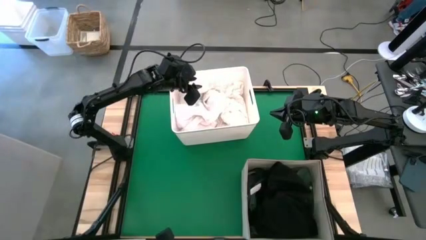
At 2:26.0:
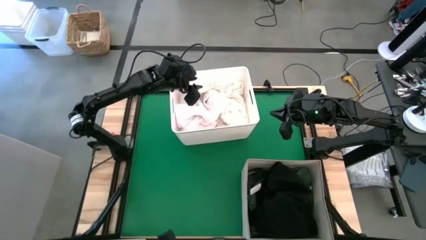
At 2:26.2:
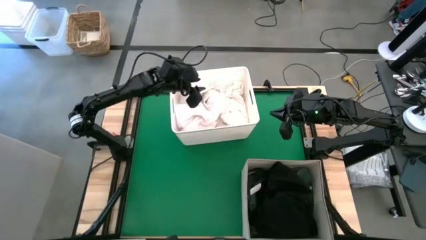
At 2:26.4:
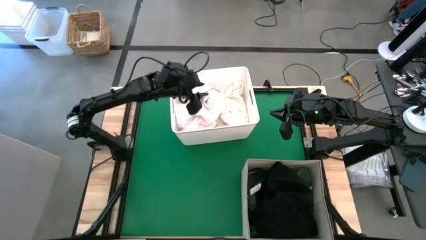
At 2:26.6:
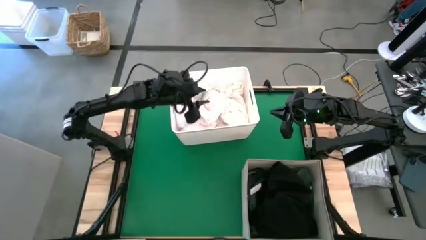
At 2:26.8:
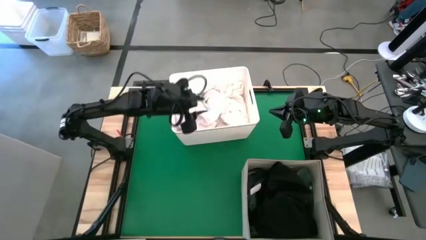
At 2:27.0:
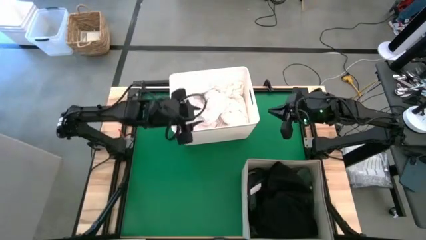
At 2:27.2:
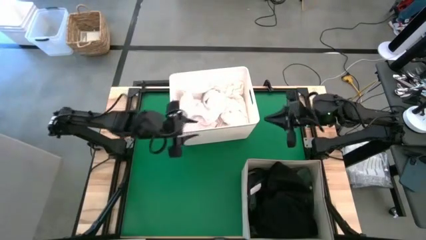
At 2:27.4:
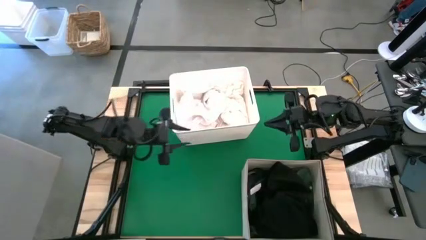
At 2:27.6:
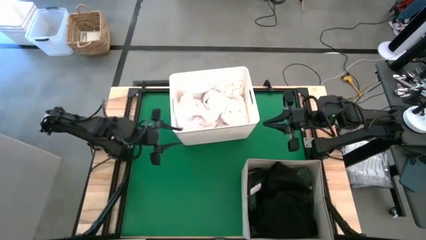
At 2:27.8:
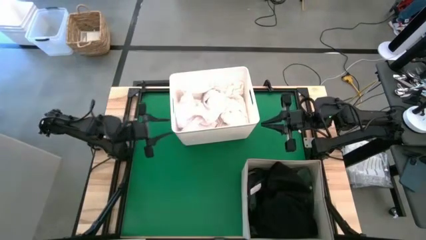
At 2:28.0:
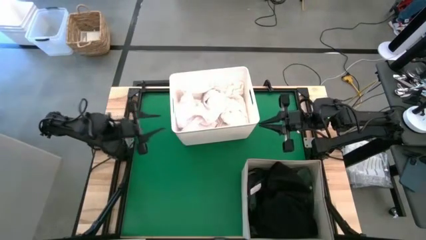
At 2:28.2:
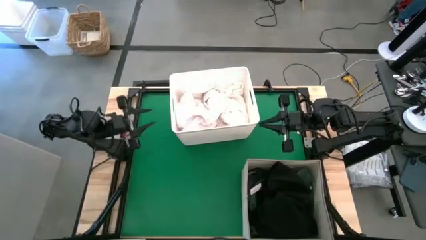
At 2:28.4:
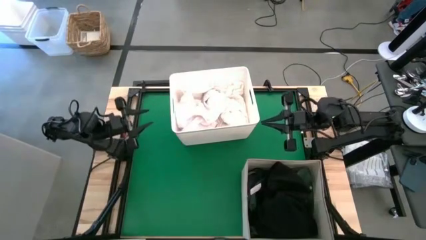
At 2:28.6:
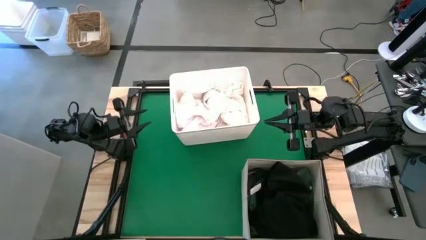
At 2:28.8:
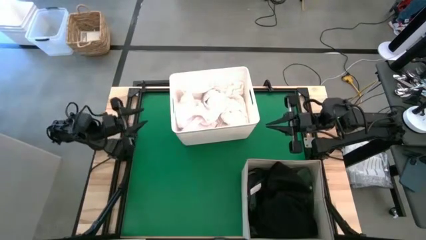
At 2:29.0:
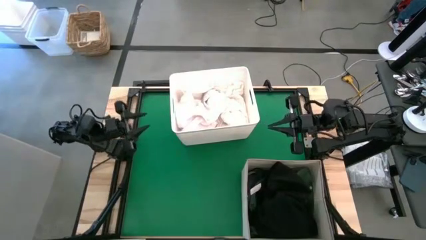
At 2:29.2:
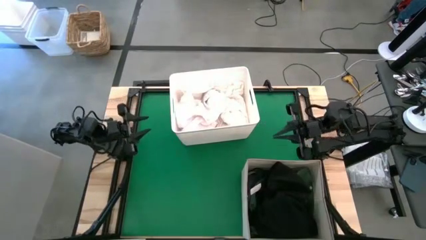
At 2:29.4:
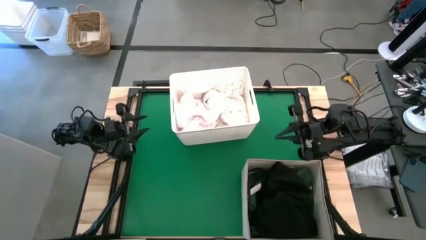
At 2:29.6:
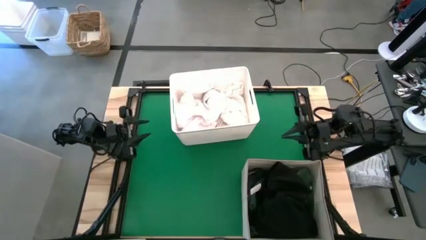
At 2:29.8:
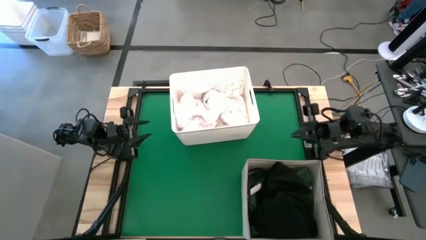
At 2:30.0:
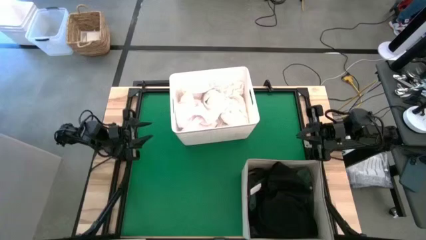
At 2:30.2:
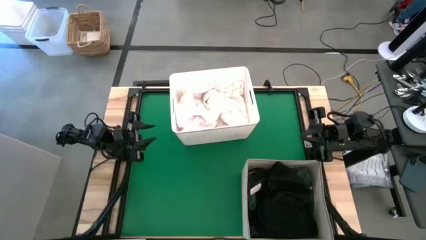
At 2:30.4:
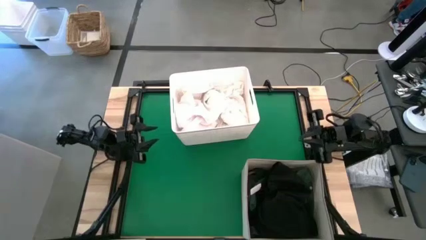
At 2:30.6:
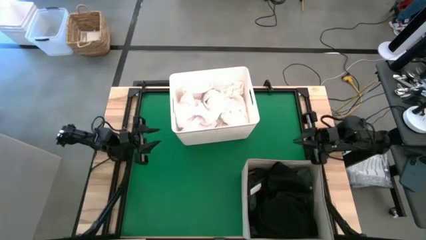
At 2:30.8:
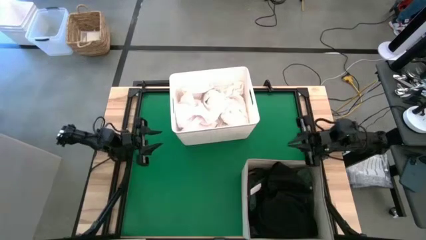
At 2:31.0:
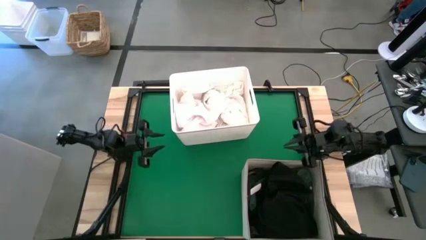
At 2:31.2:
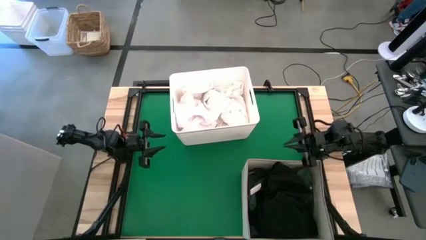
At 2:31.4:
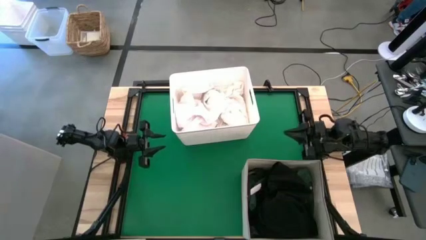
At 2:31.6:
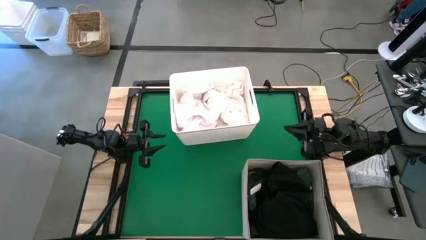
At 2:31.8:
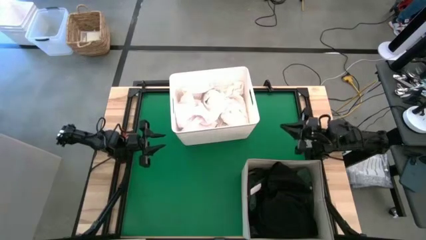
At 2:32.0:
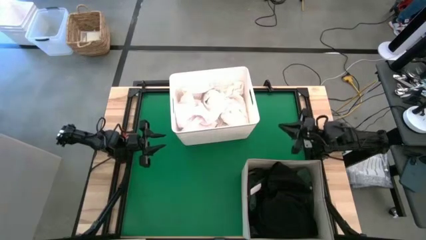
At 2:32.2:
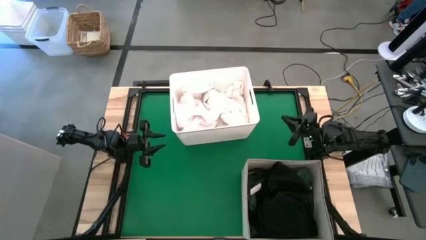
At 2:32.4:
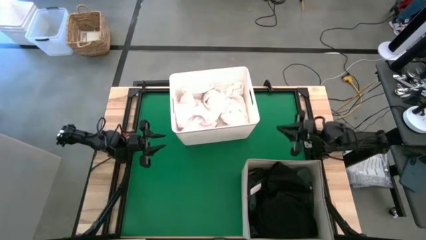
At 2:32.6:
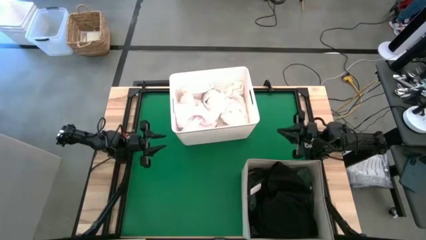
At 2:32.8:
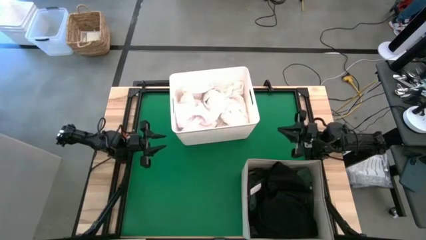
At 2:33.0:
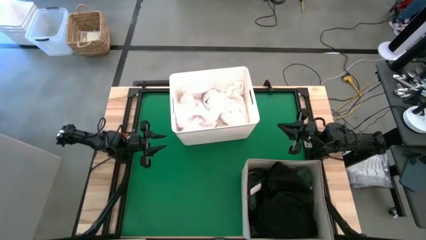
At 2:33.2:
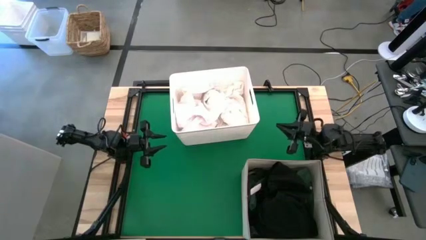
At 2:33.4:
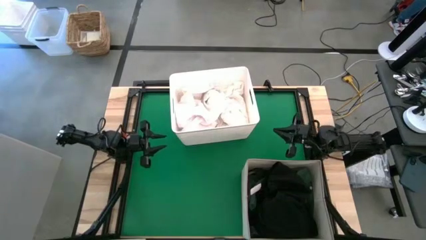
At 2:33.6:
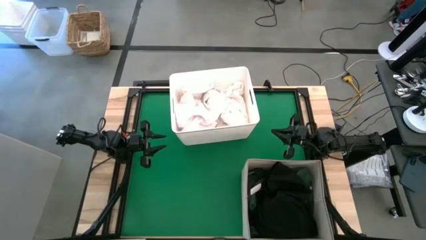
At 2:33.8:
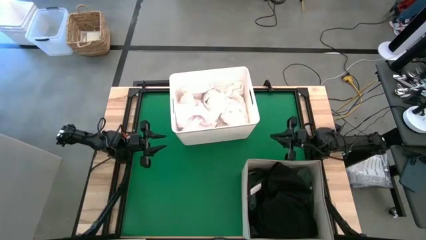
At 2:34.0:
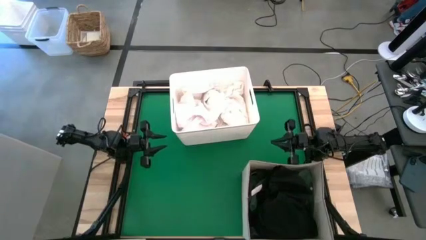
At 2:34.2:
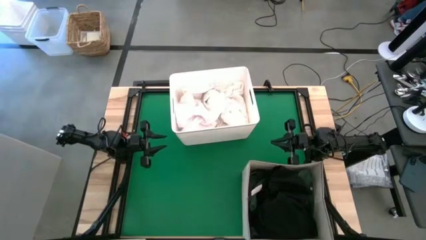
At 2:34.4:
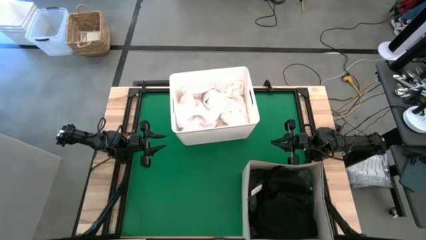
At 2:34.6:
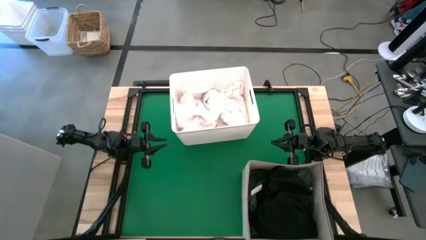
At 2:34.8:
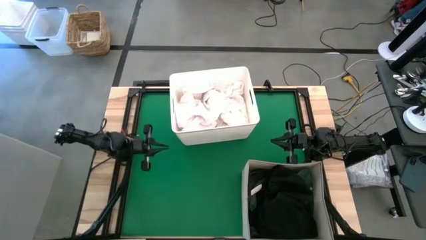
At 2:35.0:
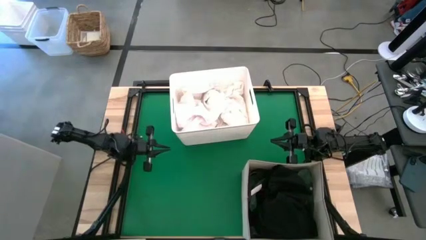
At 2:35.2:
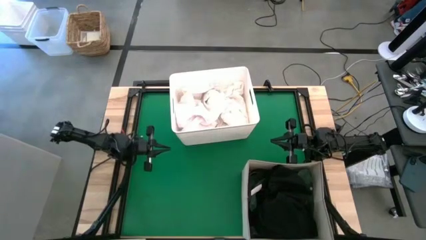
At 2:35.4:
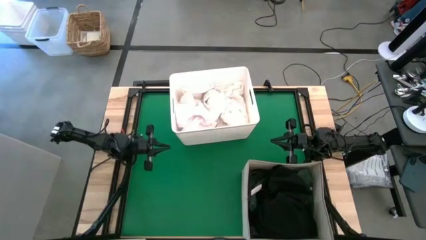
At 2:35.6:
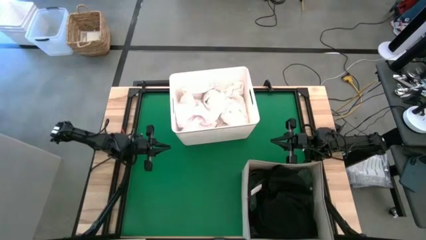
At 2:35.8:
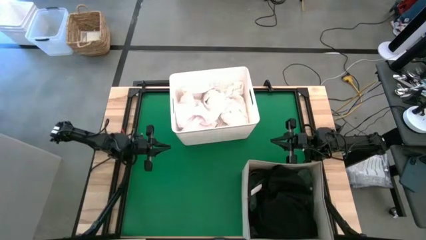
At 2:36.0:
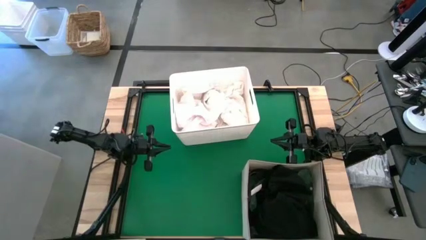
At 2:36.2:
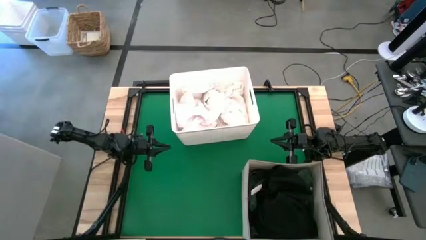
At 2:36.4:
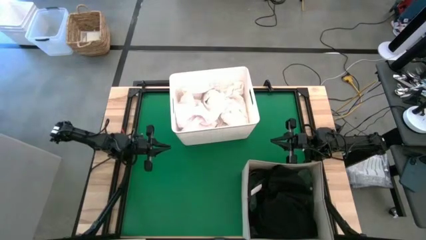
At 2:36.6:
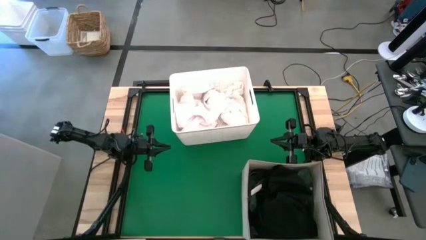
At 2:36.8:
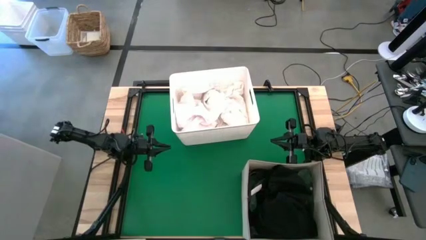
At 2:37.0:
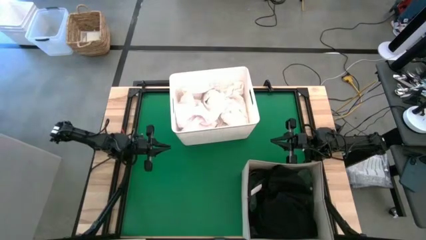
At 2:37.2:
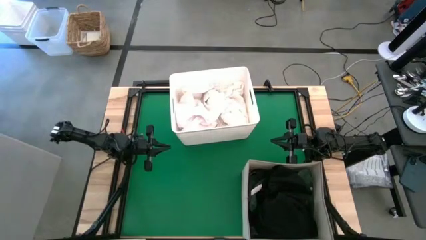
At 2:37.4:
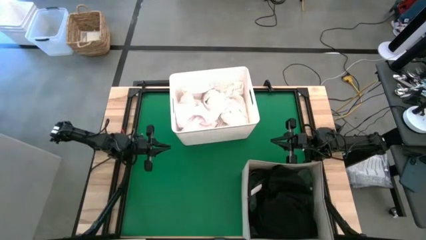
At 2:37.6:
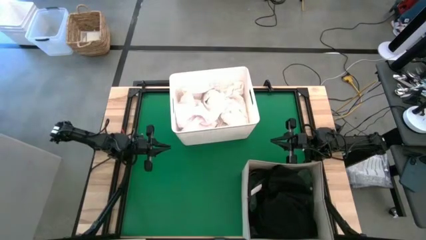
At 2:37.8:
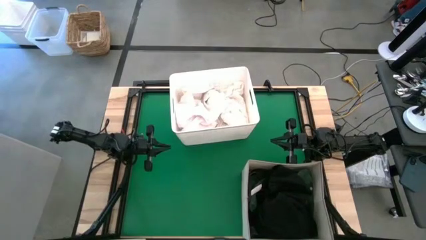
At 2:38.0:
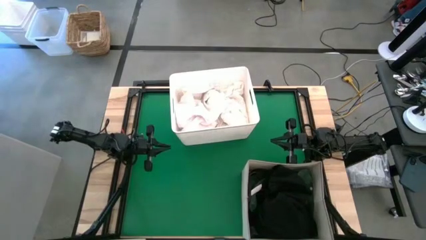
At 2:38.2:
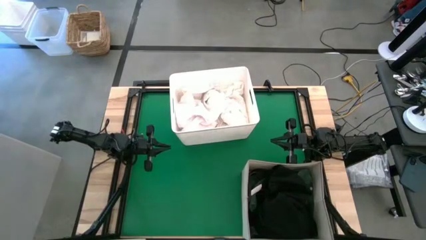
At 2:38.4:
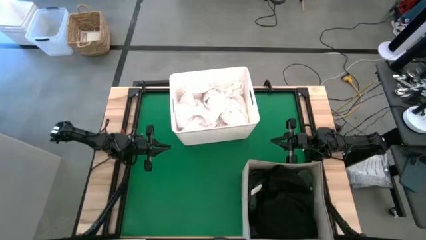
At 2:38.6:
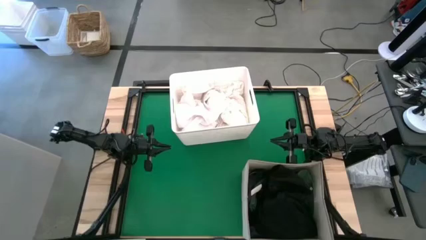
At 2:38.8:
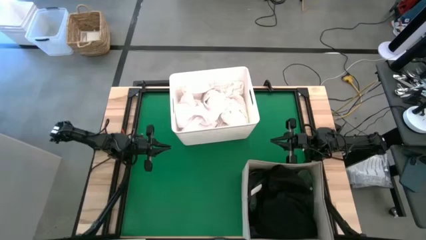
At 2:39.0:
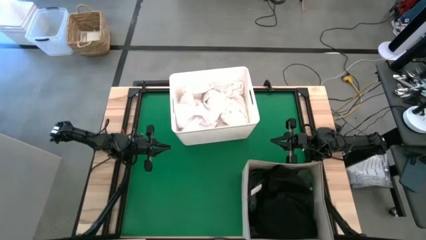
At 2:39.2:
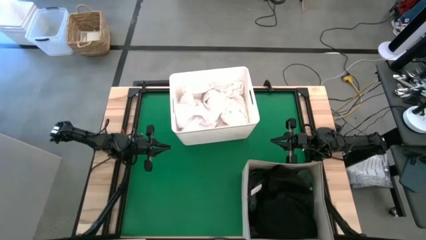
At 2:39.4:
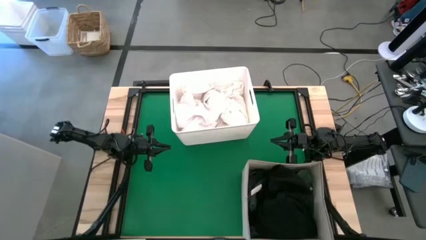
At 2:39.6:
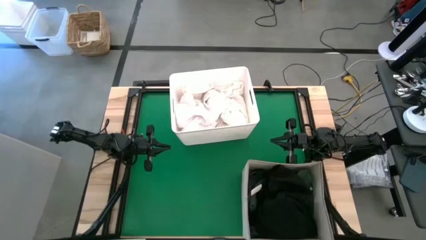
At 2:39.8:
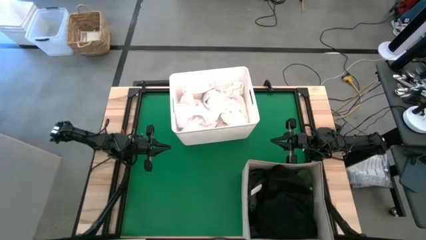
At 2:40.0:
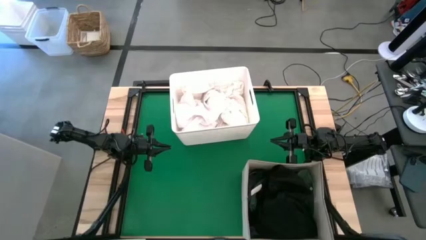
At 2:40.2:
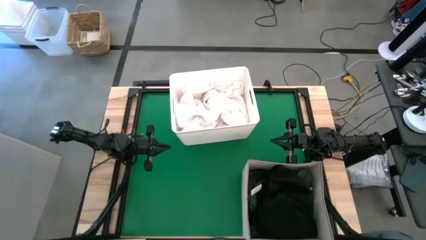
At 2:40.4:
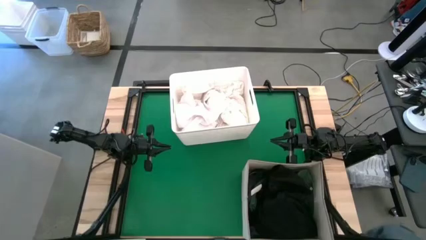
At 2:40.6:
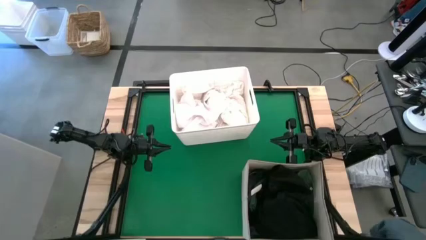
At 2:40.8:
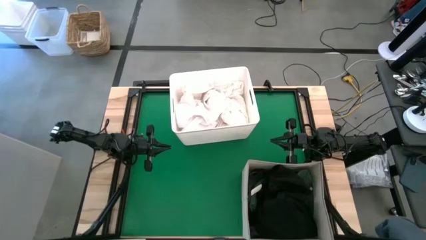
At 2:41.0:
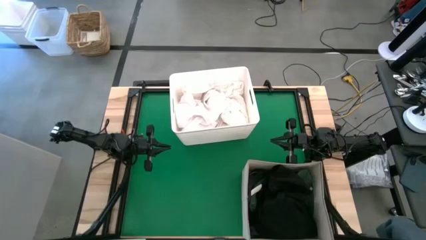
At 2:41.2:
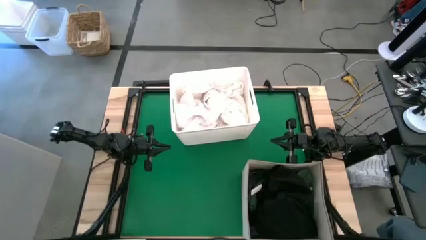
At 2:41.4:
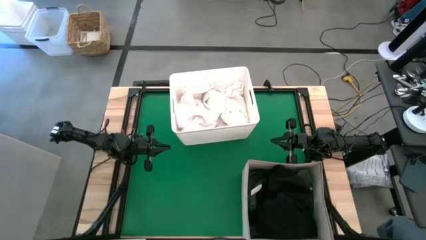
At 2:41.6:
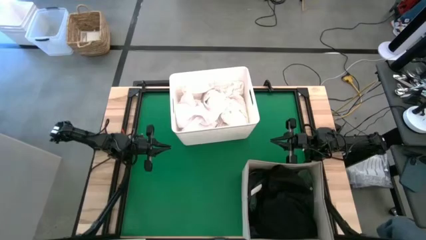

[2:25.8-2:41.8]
Return to Home Position
